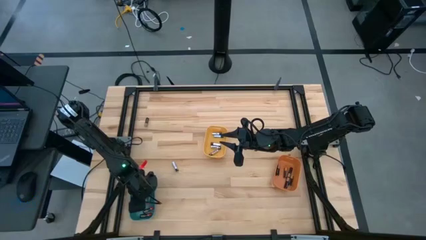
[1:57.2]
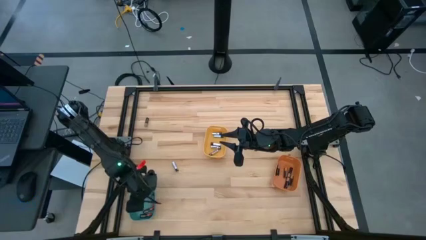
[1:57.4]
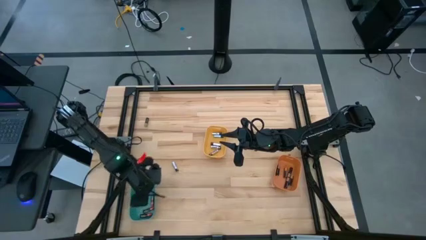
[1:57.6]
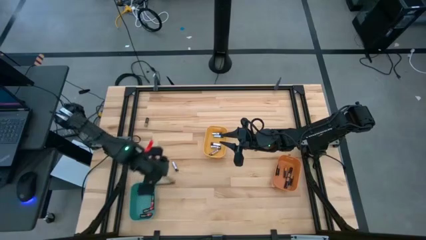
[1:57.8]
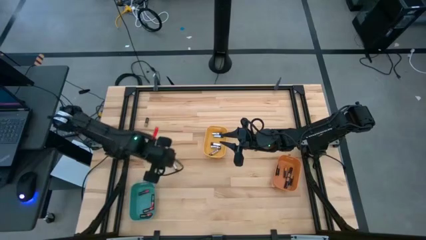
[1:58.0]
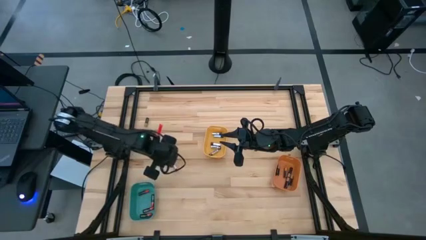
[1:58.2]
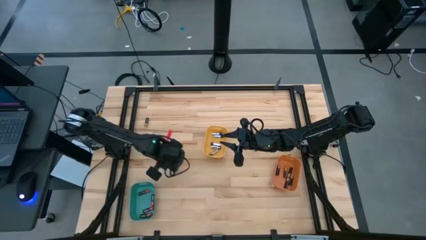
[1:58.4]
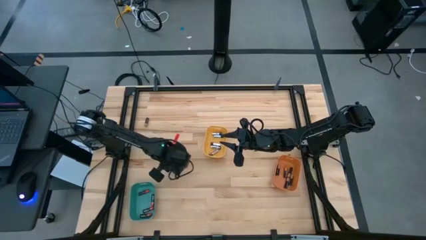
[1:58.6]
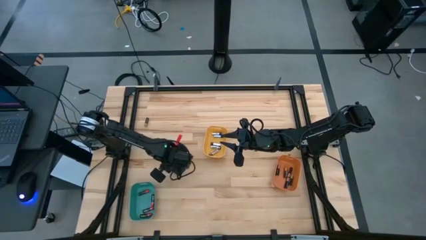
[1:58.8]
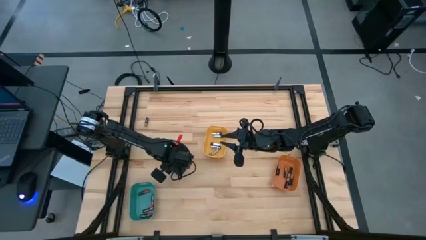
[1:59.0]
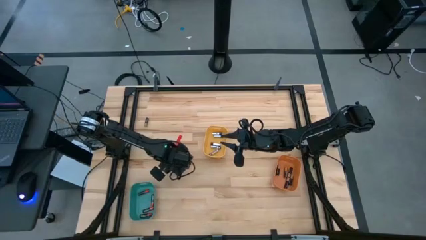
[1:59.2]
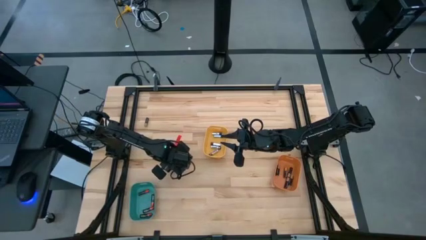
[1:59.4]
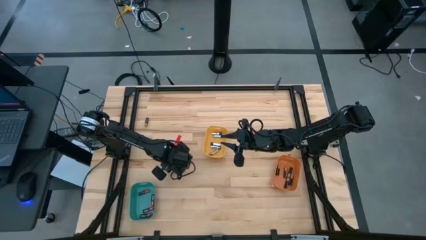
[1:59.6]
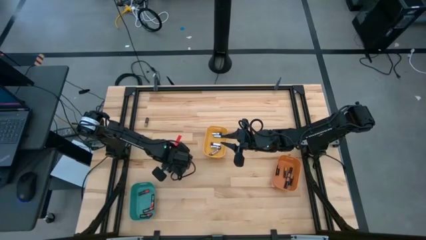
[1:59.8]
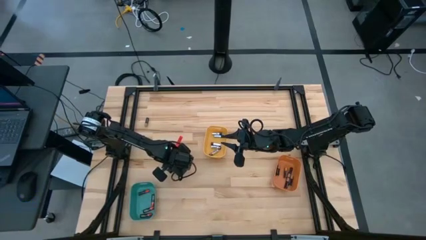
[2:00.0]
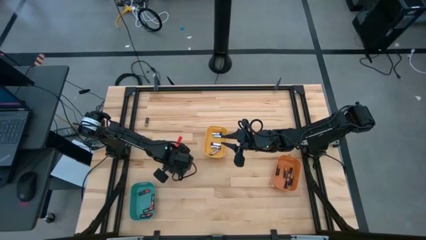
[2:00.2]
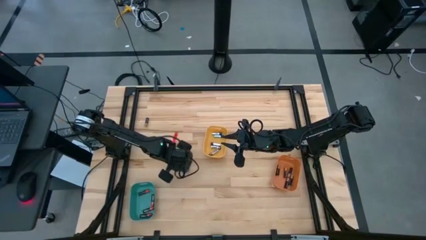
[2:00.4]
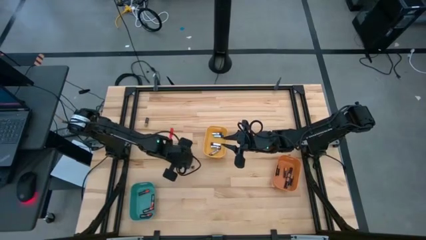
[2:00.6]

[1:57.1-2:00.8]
Task: Sort batteries
Put the silver battery into the yellow bin

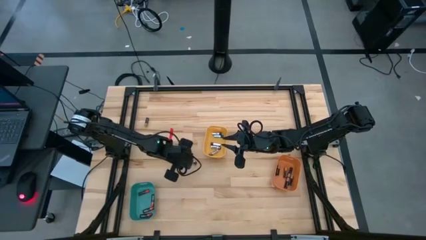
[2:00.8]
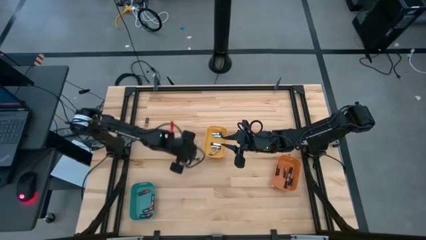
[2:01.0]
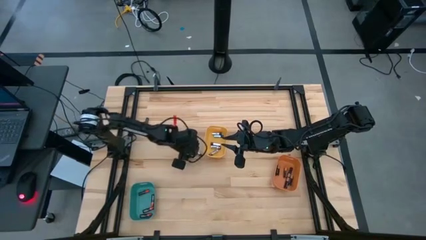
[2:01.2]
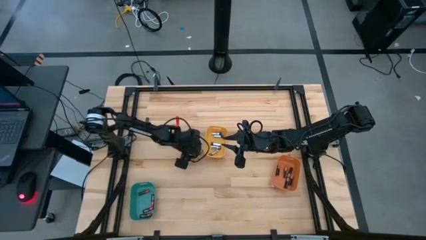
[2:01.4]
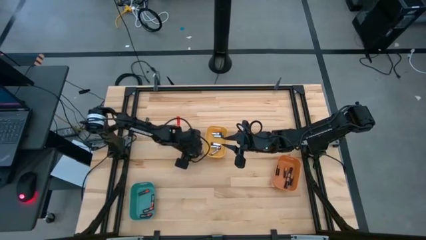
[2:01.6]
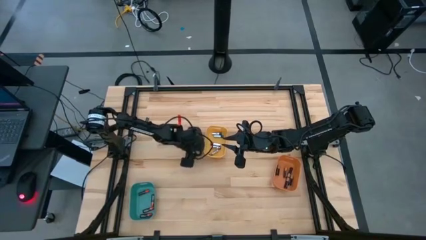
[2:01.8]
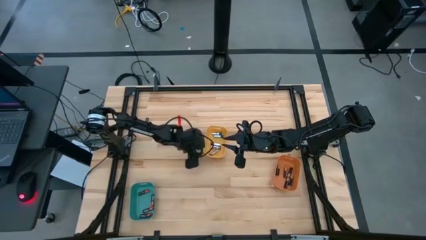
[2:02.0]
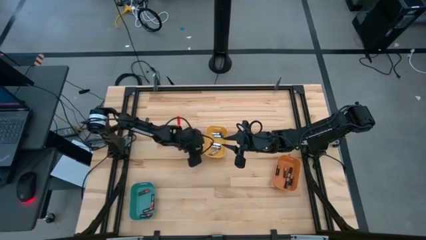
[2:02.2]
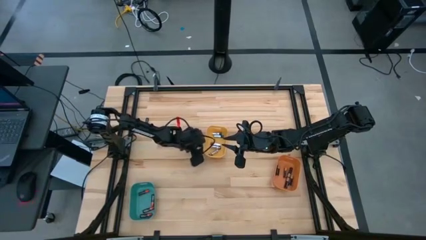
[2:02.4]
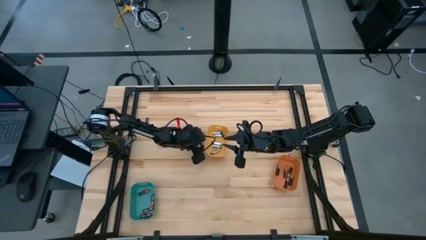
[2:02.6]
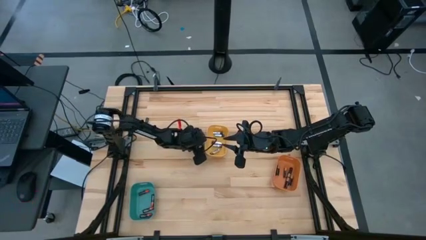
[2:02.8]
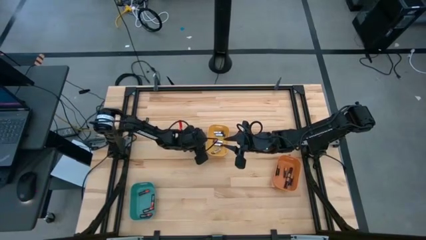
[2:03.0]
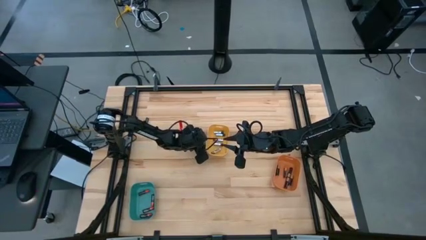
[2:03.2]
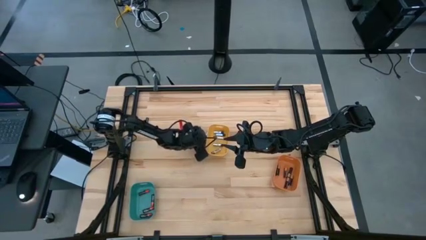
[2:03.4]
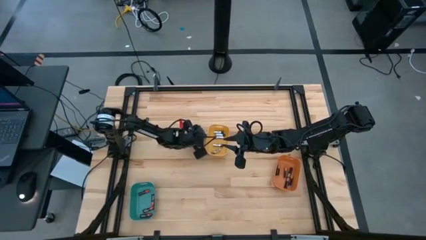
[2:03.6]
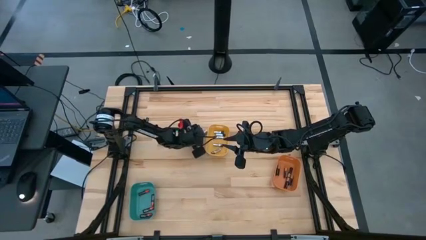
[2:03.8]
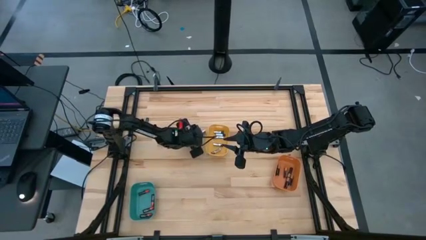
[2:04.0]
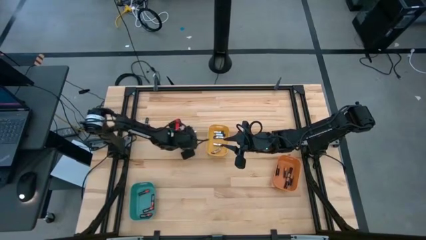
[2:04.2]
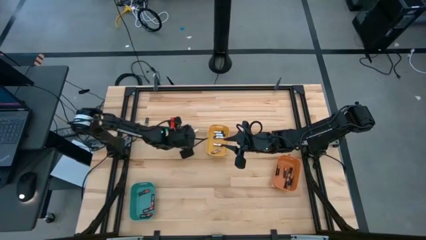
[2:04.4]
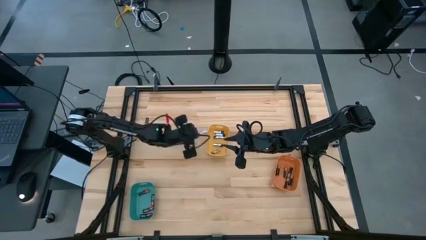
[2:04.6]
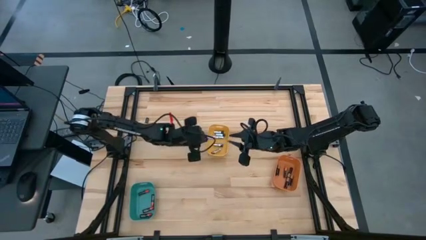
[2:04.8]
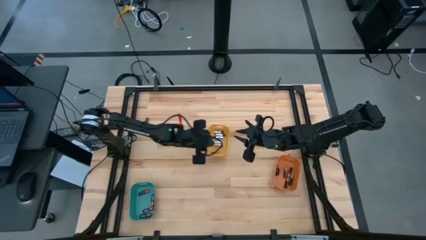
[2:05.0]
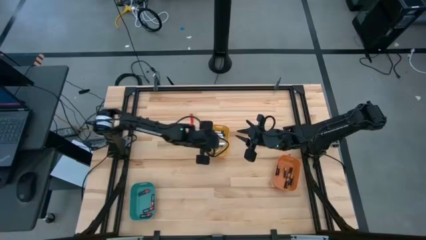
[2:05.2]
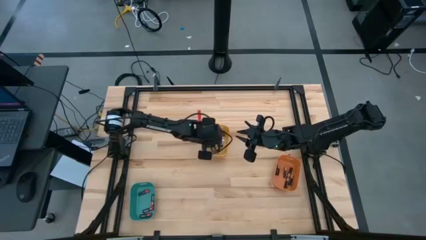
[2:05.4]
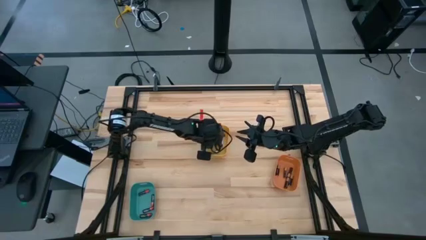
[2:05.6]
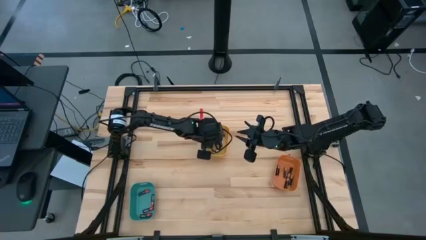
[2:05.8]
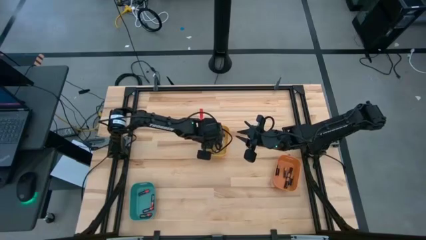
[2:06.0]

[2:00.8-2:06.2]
Put the silver battery into the yellow bin

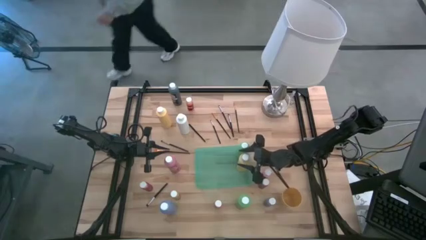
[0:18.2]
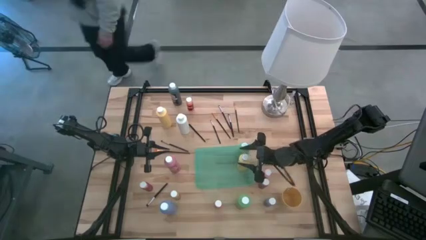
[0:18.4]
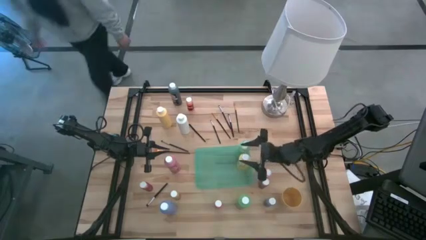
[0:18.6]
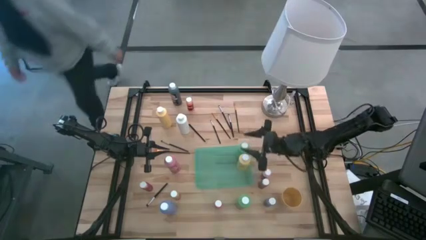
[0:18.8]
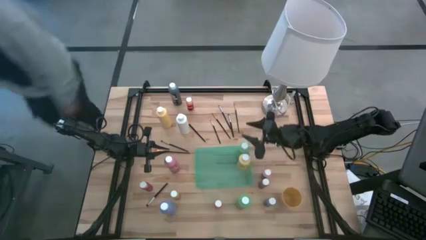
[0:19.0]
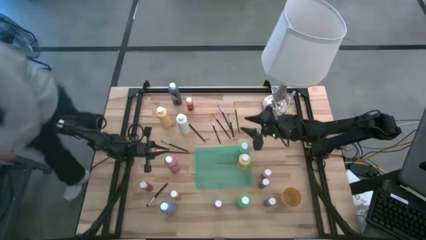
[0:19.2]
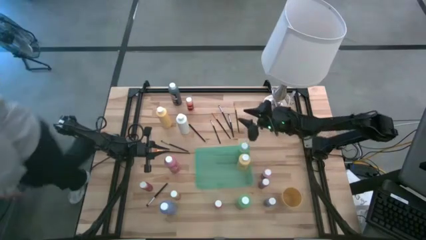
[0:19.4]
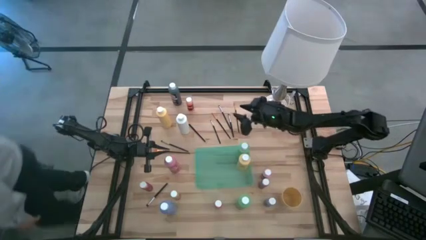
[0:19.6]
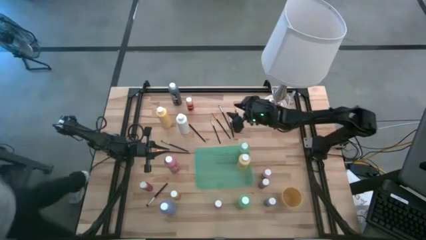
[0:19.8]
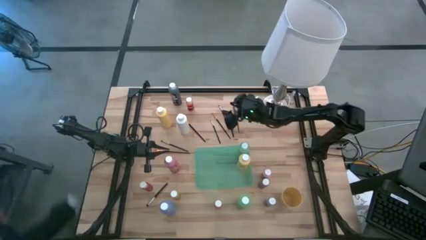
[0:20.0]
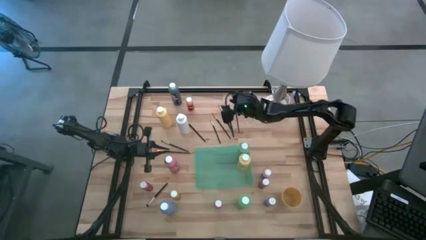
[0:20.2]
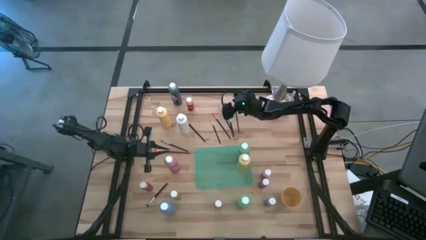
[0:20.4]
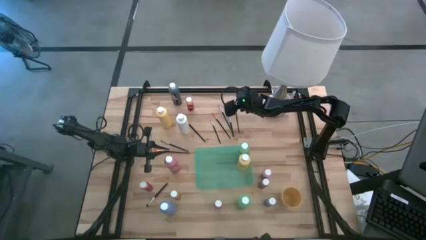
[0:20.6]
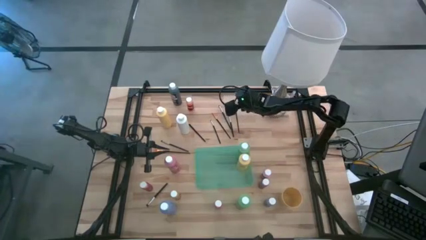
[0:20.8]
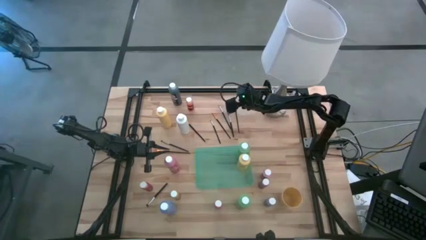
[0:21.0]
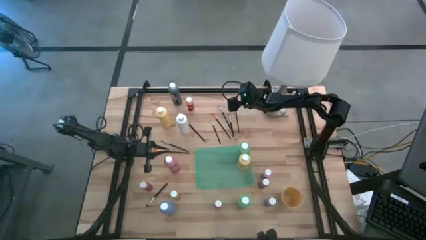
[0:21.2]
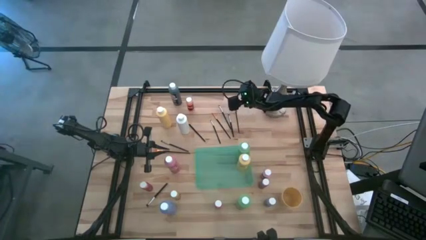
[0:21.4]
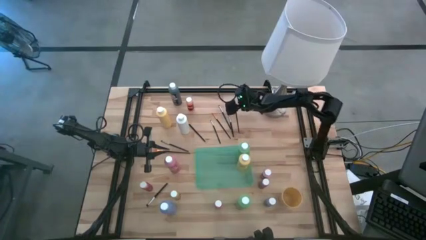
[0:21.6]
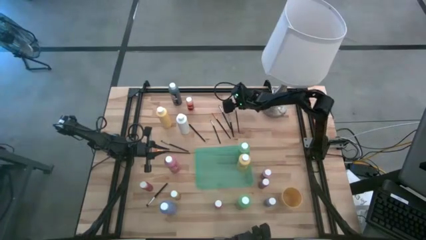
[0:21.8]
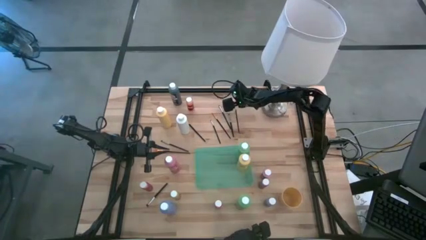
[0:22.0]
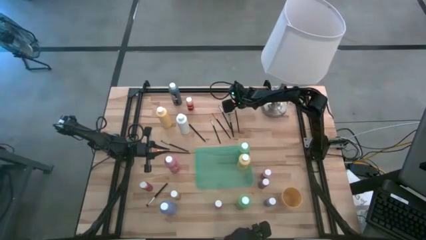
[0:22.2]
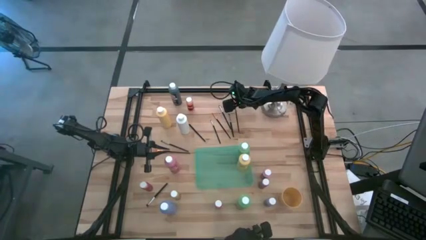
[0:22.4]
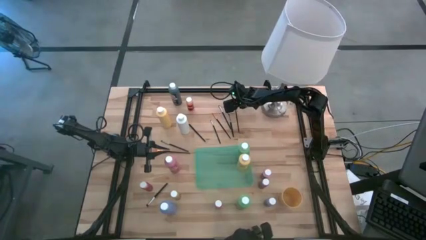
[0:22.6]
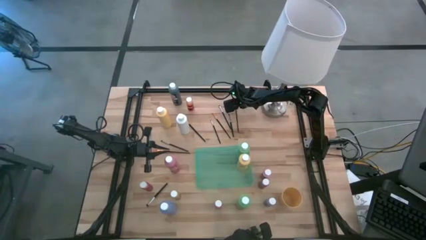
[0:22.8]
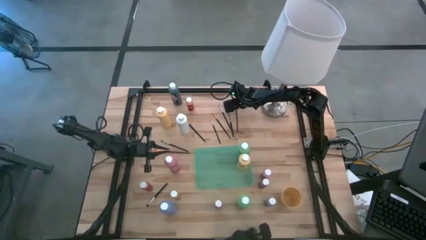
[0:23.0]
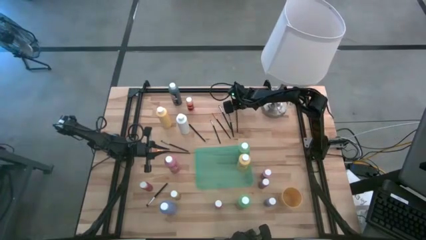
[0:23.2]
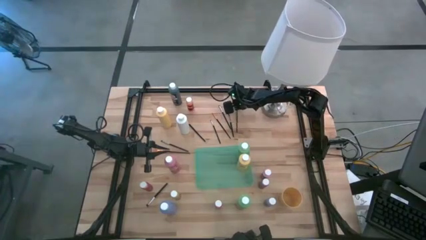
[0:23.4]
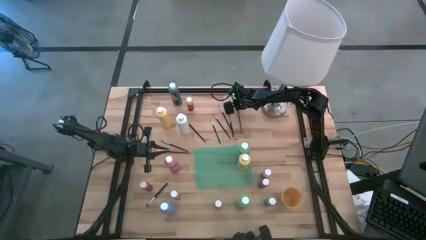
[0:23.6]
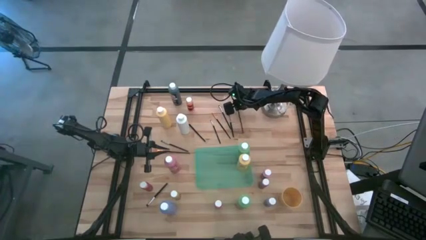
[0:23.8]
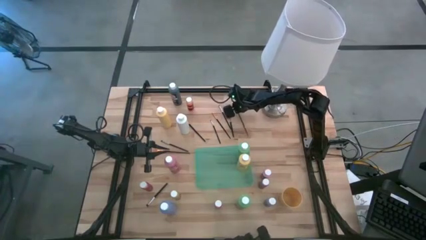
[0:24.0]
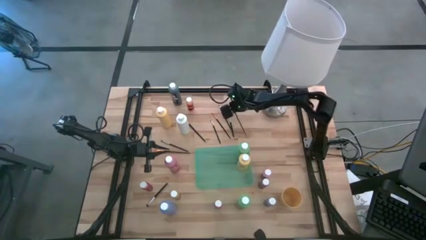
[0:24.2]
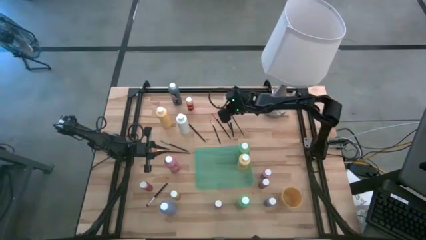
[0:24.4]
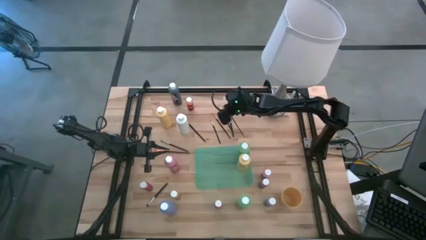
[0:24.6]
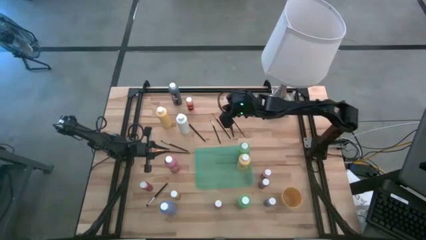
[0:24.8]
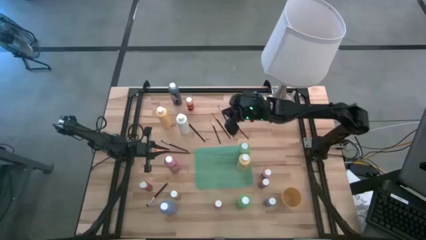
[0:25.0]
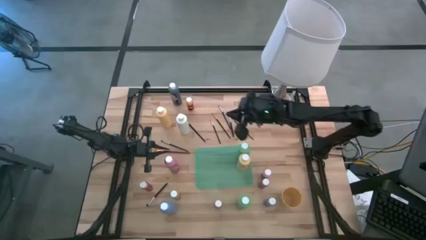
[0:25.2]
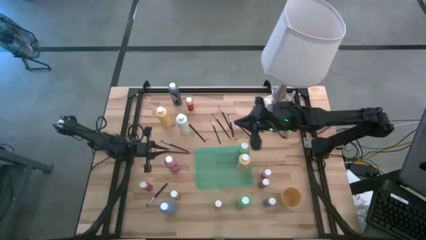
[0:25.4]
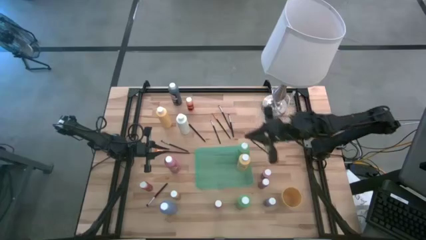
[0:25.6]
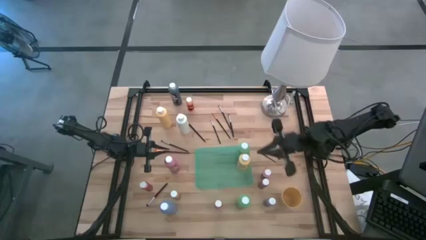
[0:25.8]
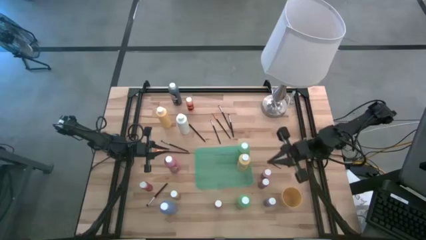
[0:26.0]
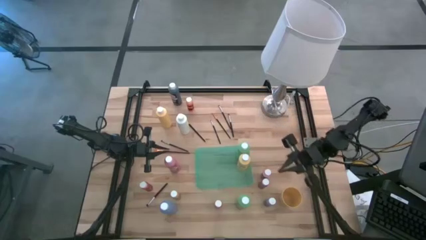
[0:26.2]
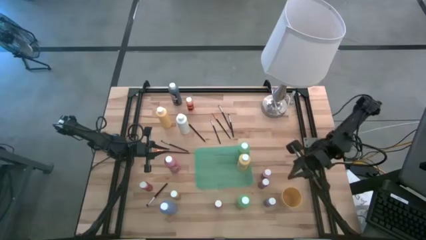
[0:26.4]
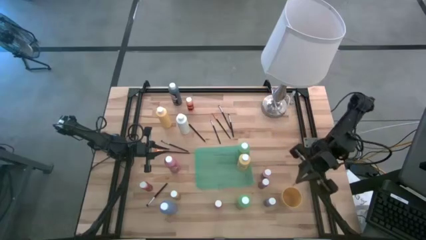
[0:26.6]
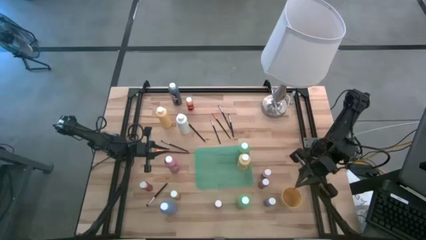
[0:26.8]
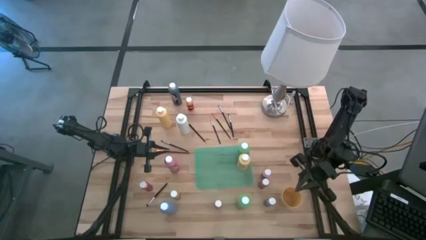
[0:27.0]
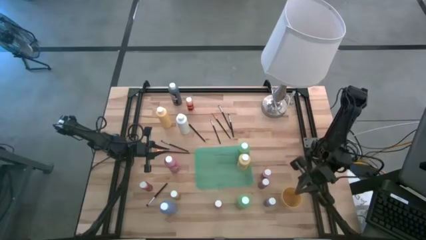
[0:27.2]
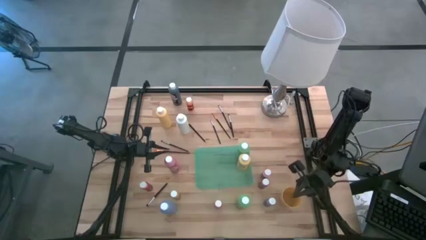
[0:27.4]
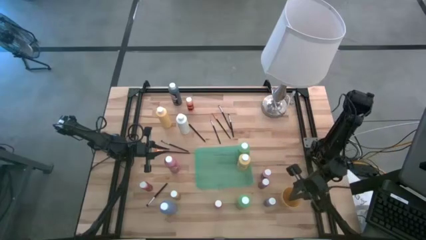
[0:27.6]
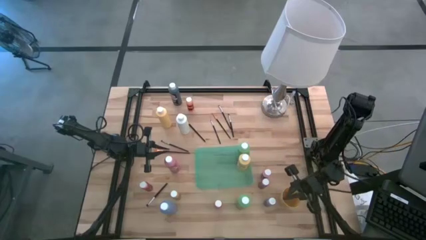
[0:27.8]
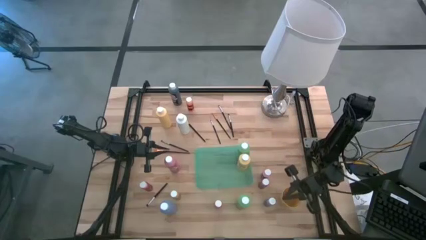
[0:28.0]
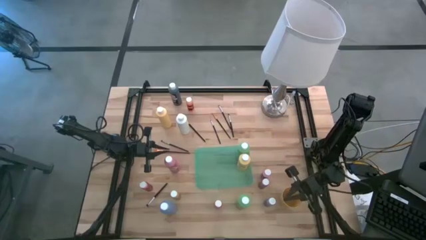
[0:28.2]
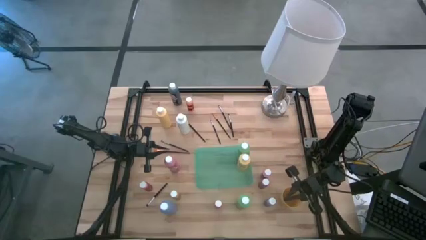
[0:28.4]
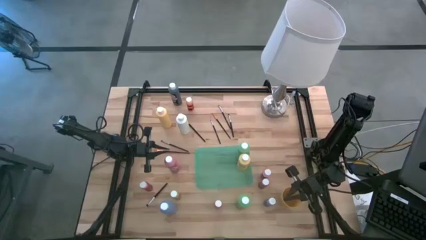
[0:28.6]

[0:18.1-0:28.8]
Task: Pick & Place Paint Supplies
Put the gold paintbrush into the yellow cup
